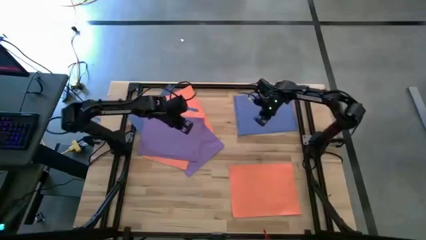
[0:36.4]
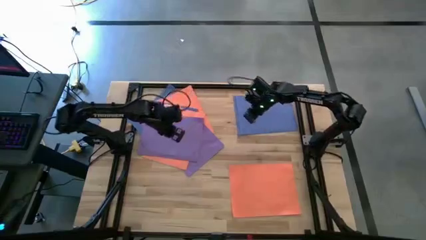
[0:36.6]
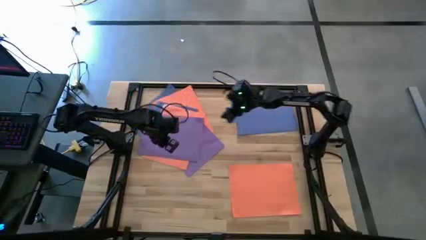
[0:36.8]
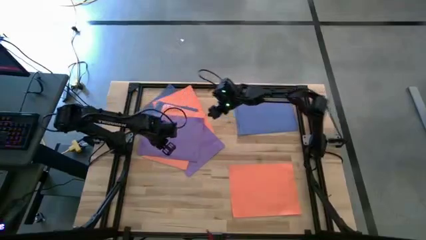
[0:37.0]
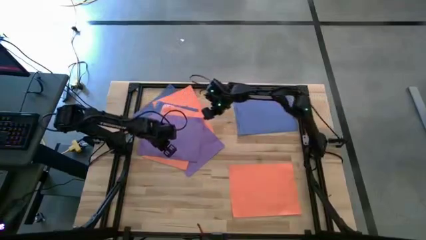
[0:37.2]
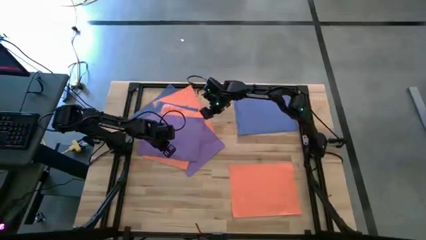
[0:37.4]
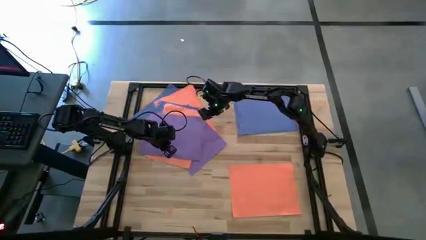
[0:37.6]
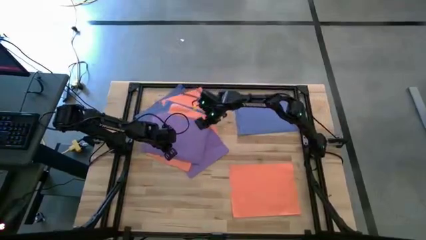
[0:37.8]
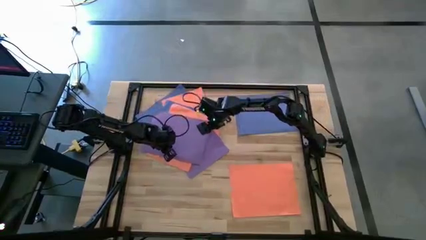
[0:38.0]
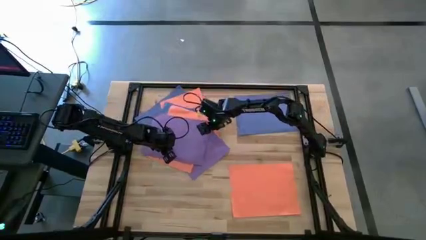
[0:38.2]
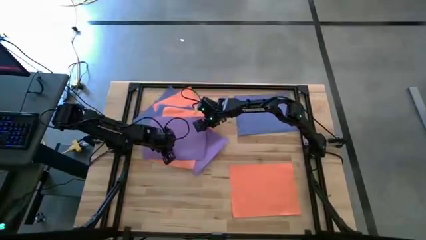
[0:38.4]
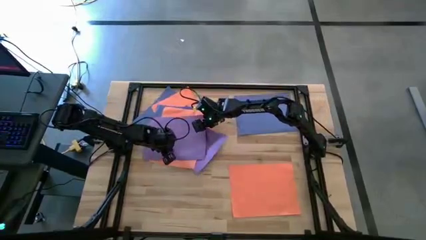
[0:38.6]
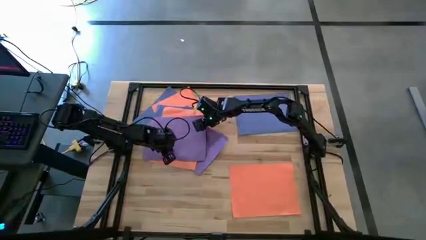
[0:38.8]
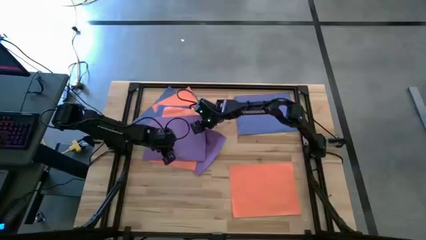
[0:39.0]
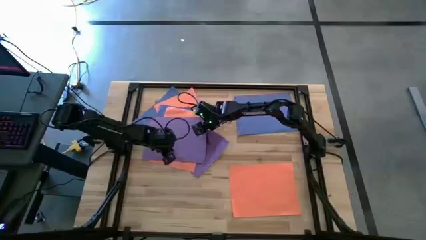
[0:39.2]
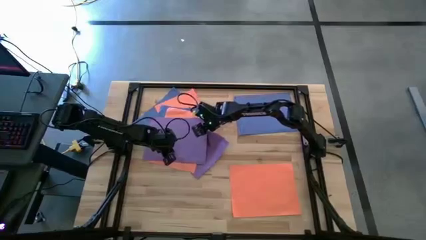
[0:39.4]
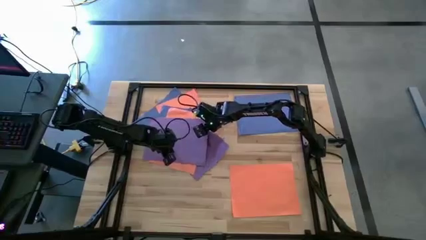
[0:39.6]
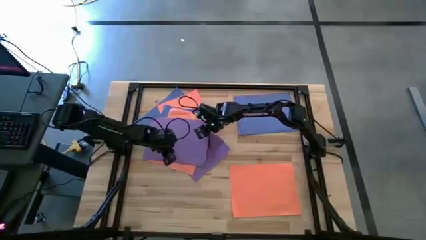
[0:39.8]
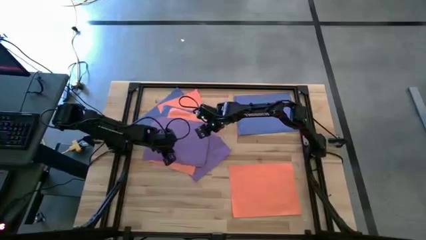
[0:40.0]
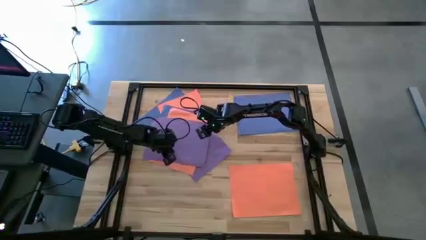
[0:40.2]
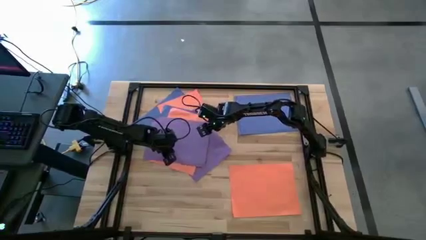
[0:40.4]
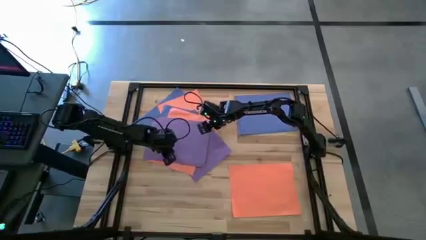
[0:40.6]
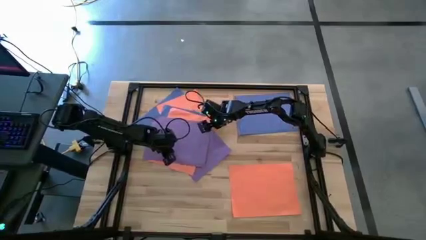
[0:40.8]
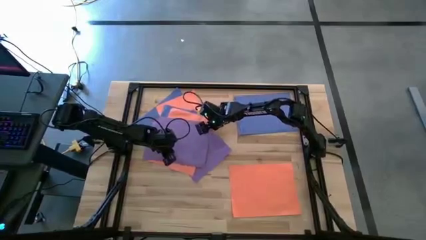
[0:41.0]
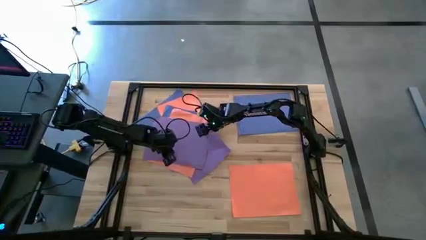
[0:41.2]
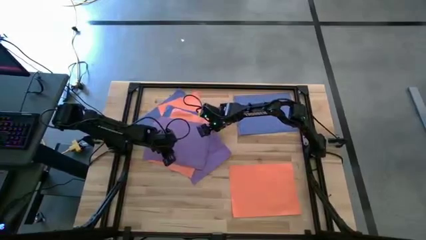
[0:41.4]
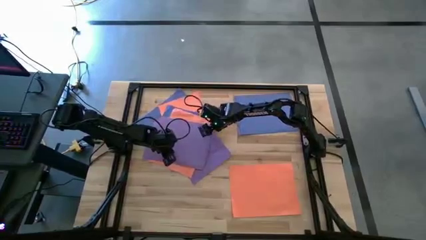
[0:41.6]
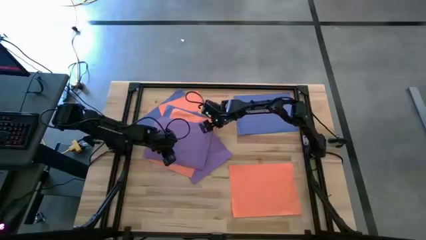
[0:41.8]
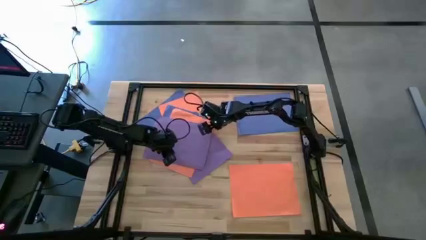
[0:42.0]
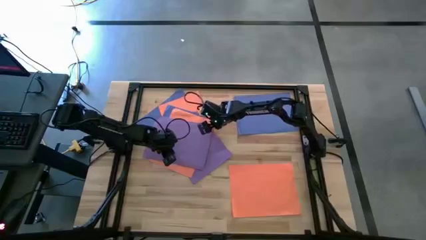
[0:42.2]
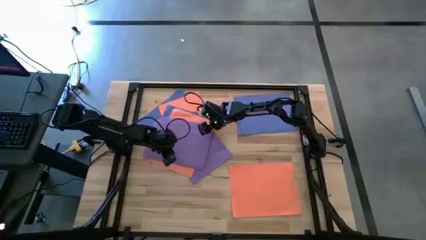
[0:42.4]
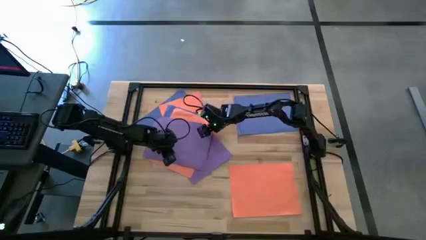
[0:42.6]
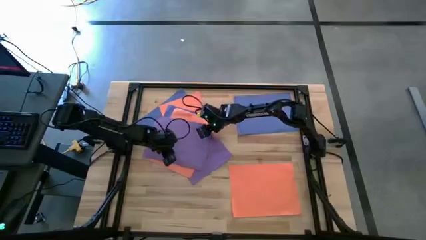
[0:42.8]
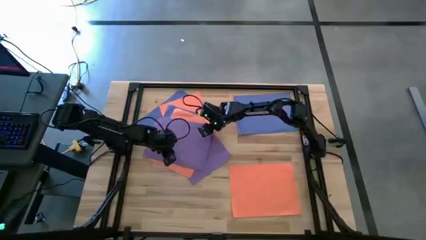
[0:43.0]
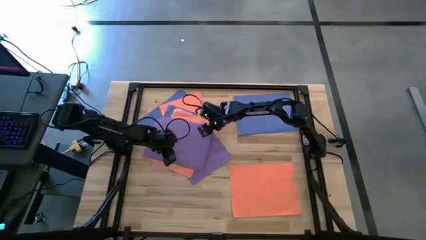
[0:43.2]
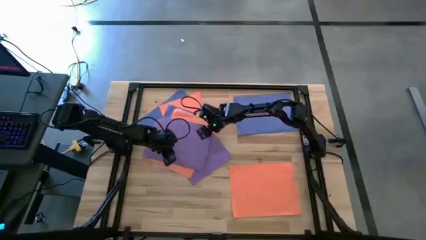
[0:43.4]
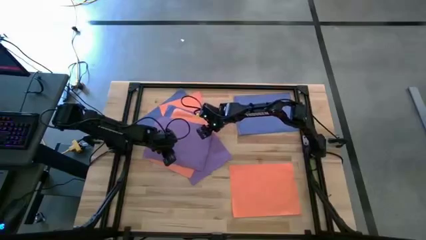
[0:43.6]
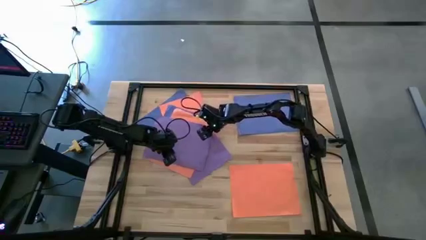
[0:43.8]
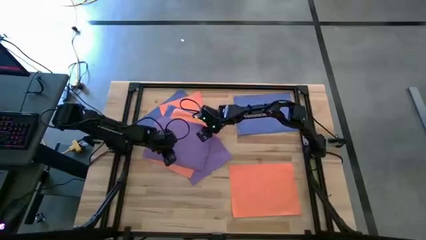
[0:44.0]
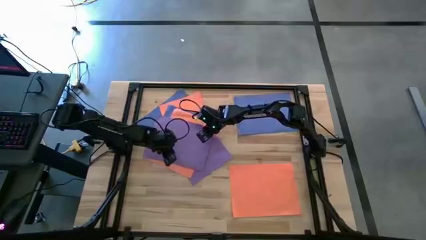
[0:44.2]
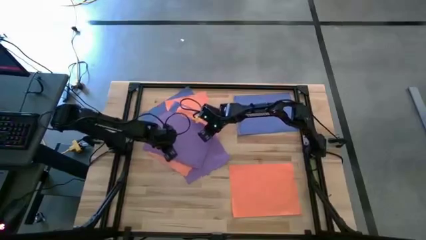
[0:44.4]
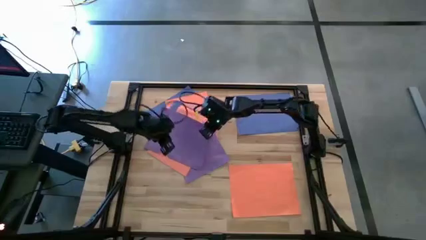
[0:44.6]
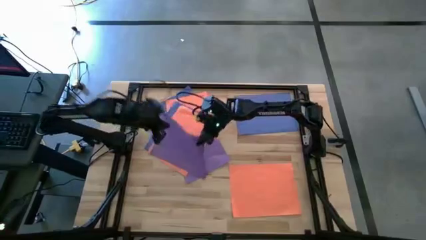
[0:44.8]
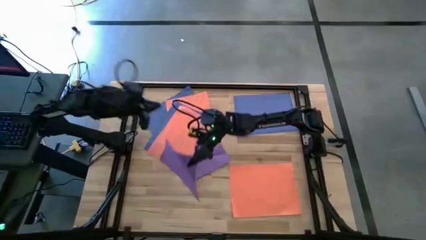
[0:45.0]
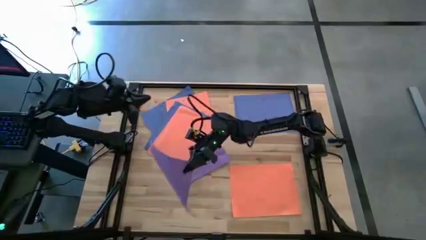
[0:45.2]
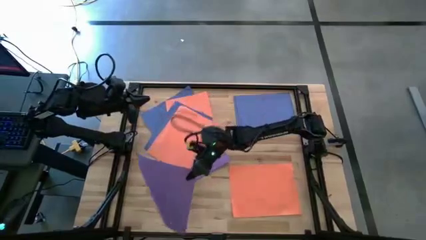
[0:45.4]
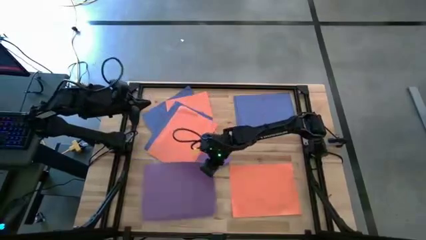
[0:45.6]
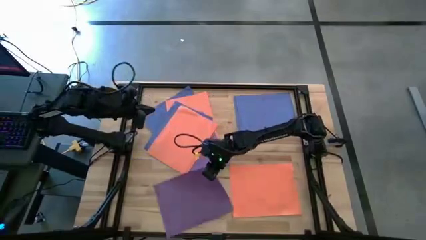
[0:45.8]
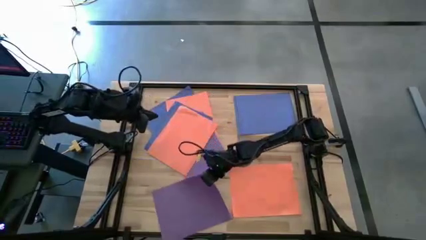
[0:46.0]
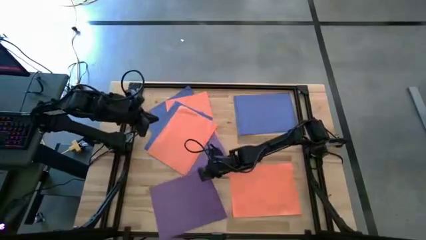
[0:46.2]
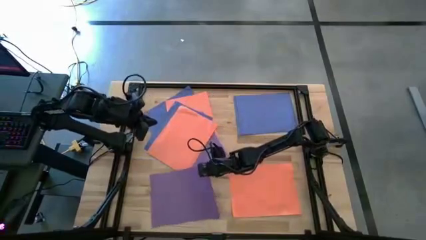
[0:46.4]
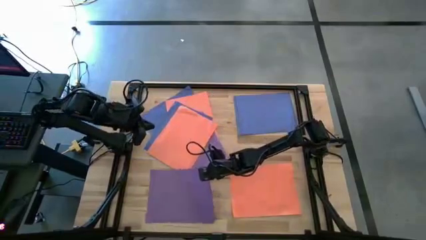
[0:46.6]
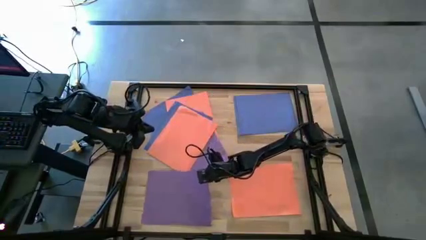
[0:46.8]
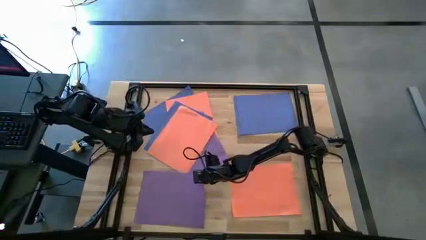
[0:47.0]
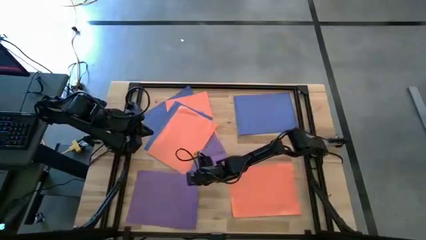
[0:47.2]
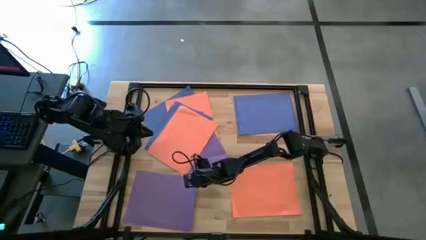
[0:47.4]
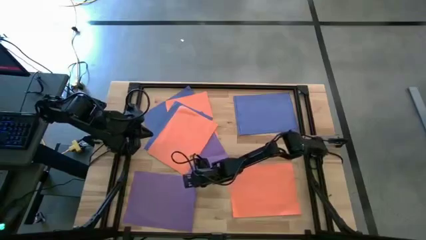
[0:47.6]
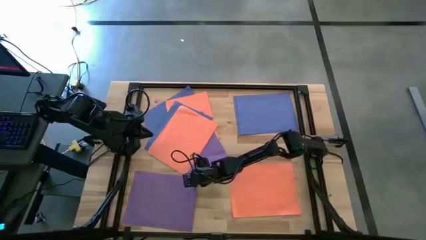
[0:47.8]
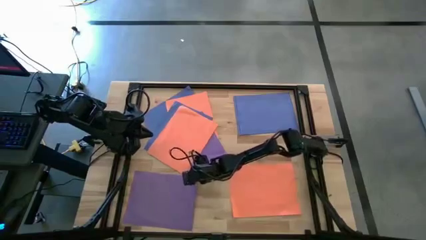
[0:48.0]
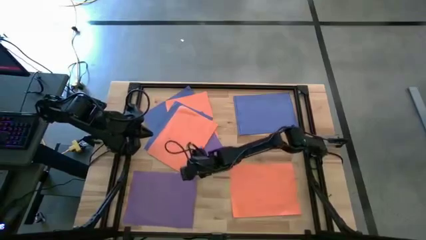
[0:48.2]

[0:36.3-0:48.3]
Task: Organize paper
Put the purple colored paper to the bottom left of the table

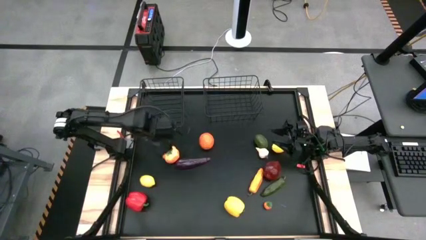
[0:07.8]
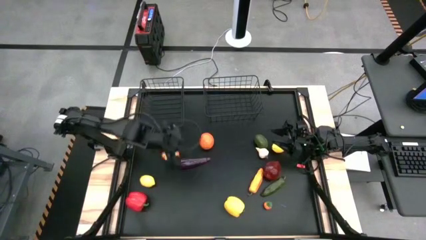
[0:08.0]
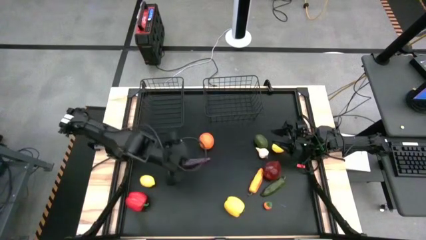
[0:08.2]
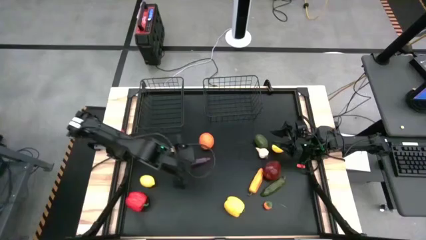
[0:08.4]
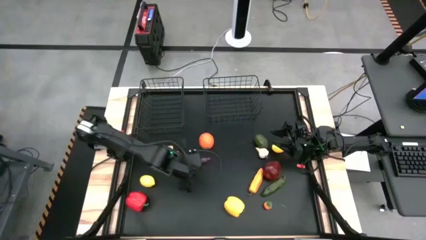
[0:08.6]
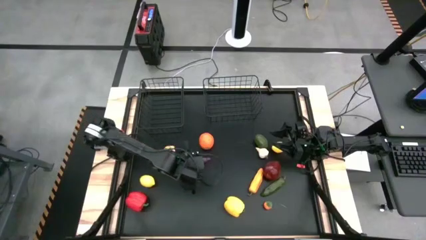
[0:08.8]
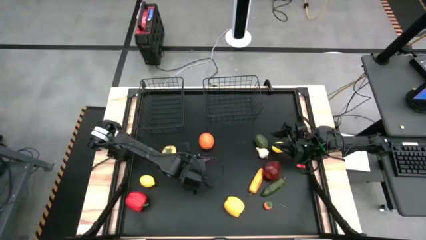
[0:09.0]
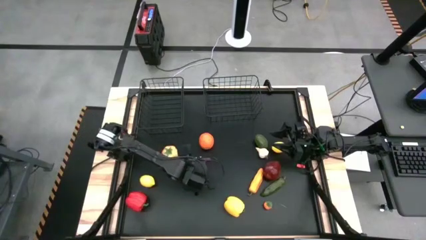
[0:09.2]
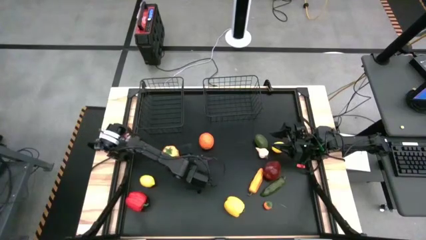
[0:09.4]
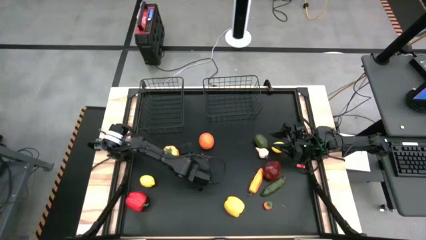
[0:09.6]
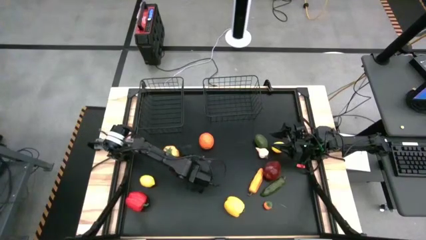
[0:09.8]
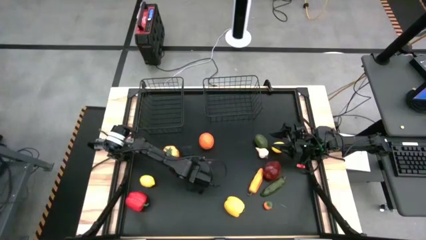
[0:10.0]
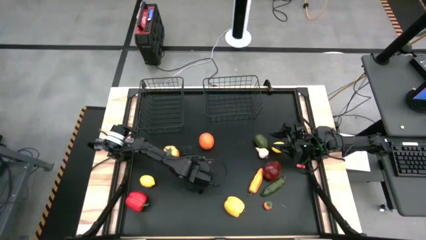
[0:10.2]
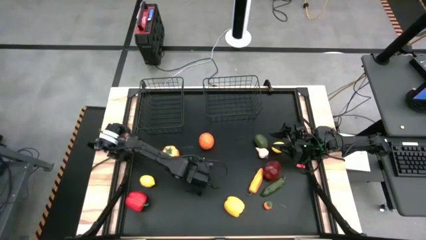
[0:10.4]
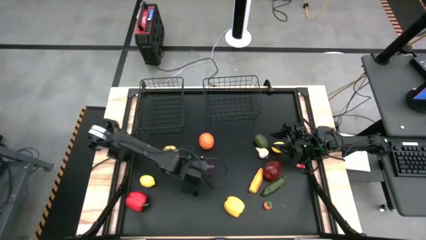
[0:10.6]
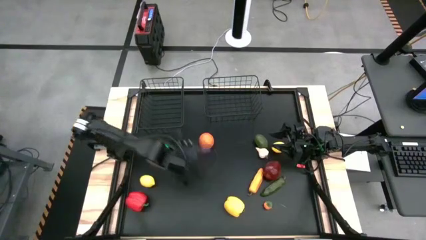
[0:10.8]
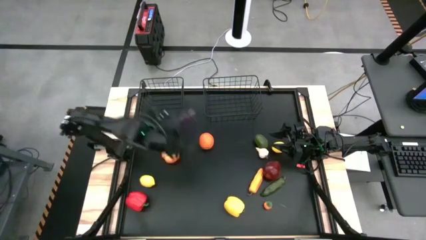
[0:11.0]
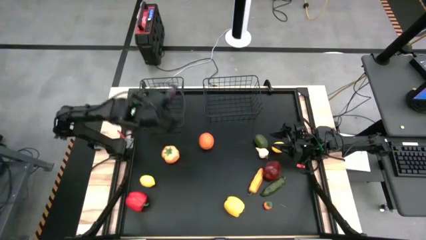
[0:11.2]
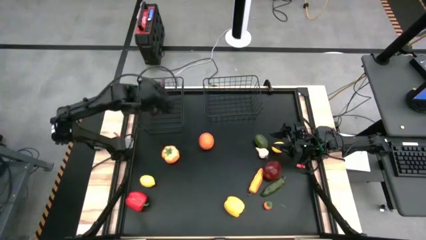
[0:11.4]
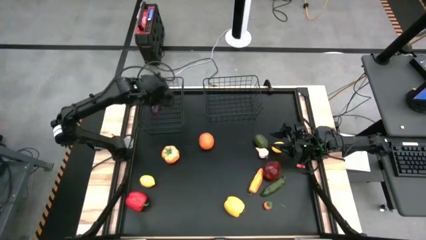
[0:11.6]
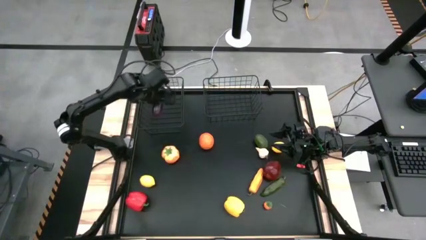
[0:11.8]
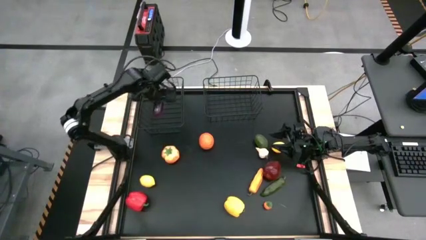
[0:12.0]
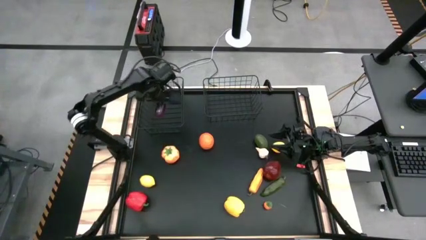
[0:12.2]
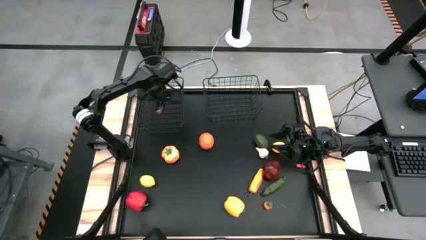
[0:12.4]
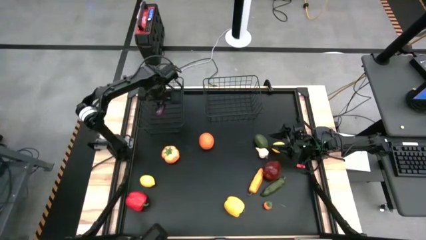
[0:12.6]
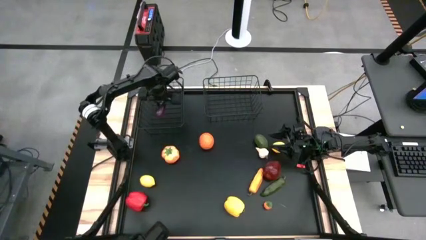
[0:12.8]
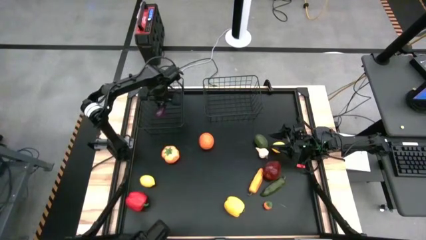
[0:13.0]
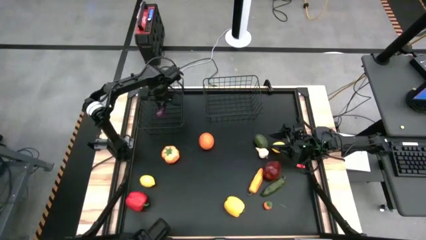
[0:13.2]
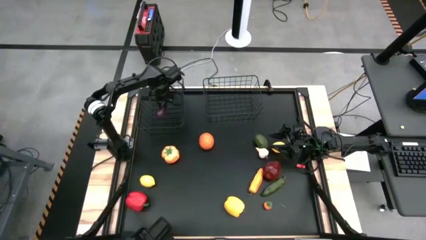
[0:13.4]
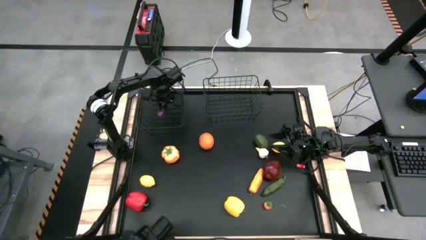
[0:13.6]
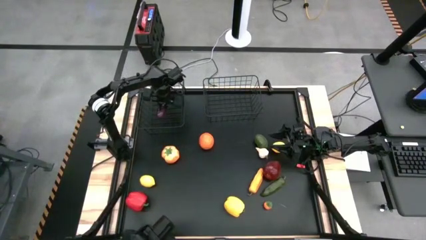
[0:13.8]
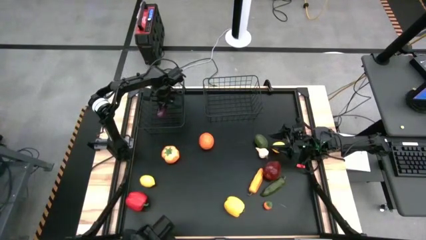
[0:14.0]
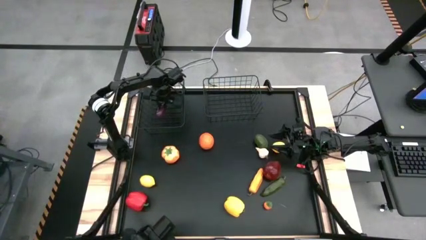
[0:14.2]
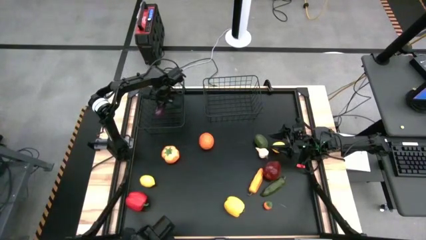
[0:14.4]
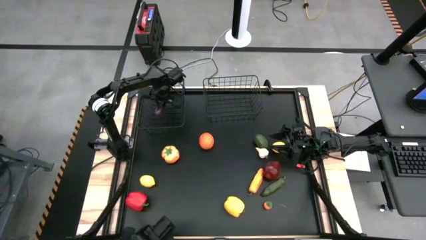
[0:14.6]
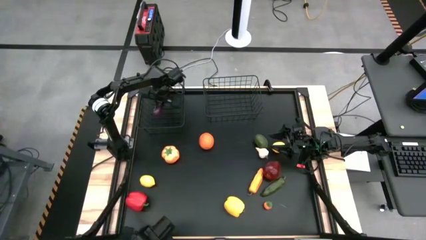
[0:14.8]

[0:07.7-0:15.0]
Task: Sort produce into baskets
Put the violet eggplant into the left black wire basket
